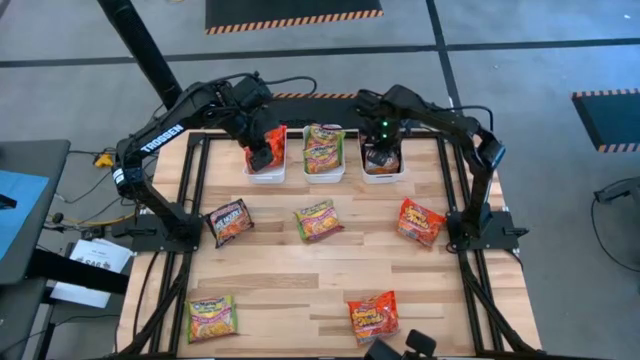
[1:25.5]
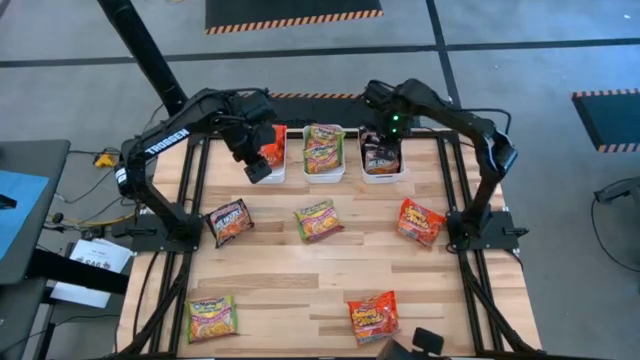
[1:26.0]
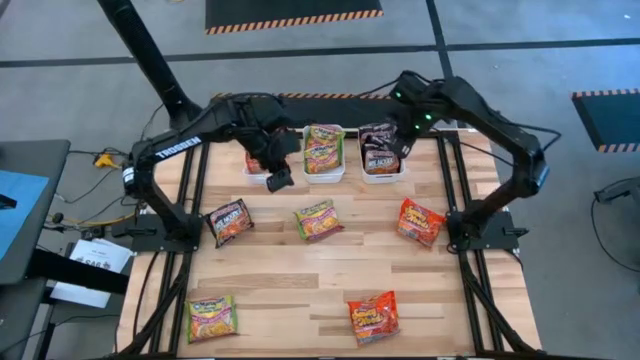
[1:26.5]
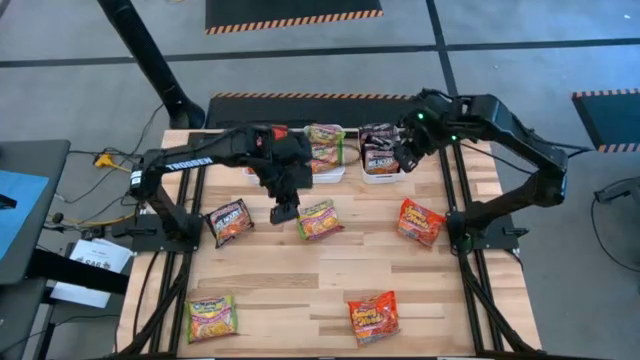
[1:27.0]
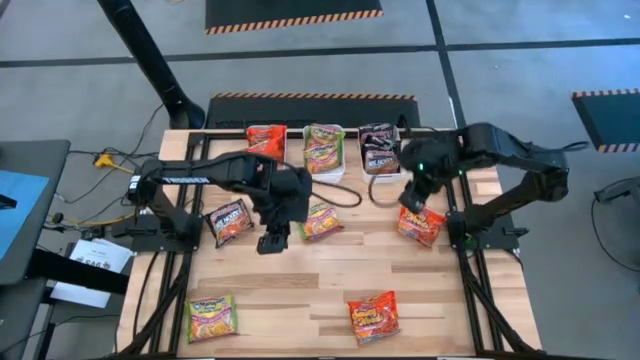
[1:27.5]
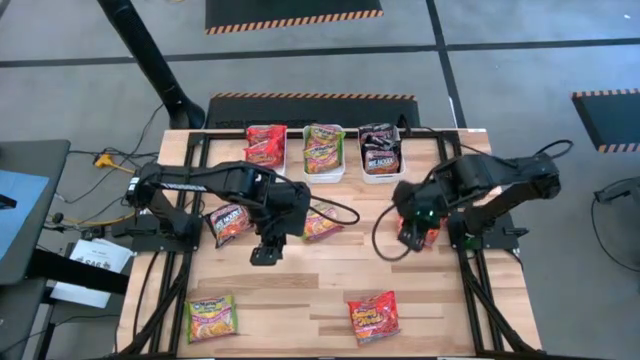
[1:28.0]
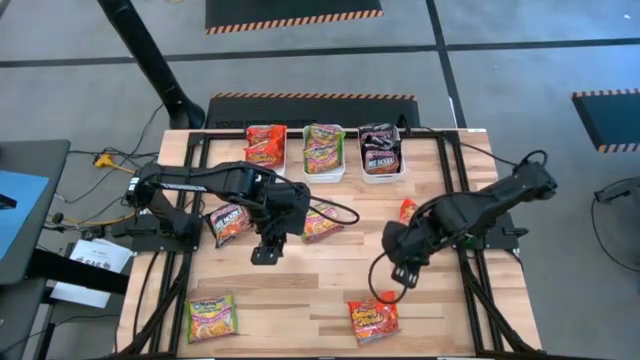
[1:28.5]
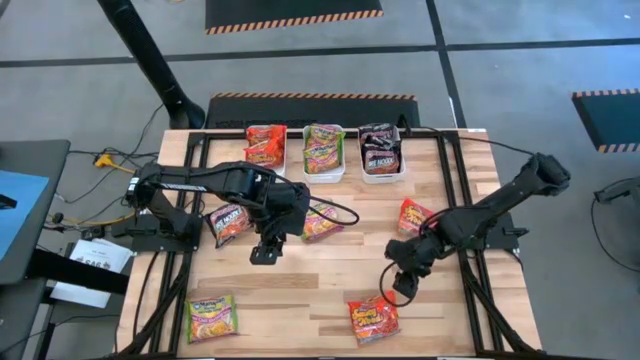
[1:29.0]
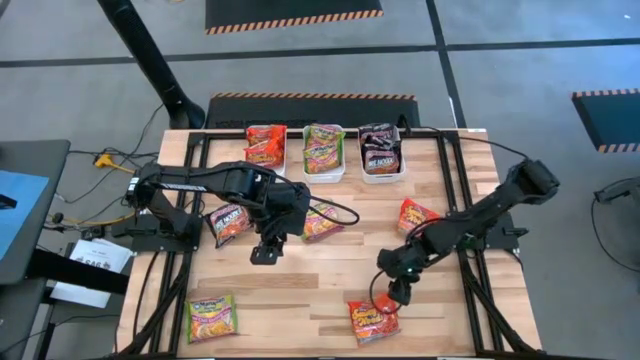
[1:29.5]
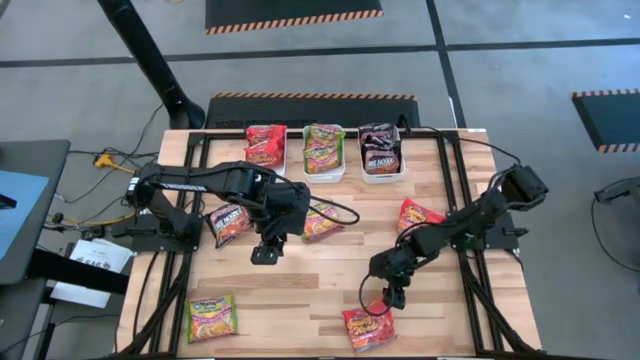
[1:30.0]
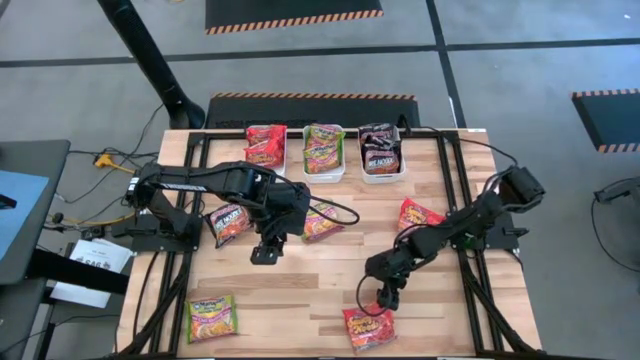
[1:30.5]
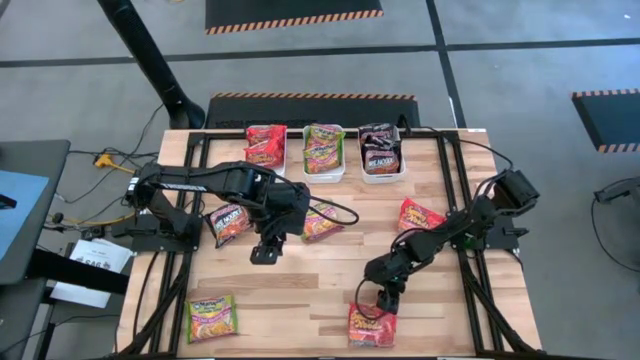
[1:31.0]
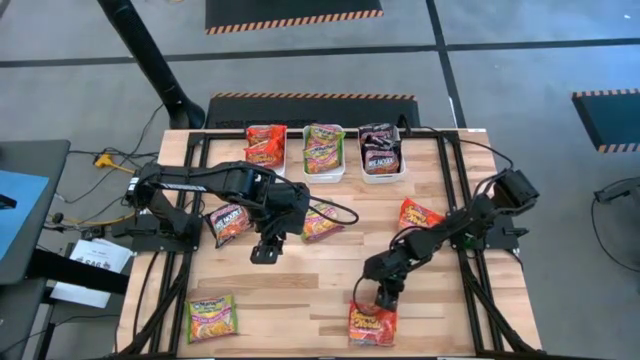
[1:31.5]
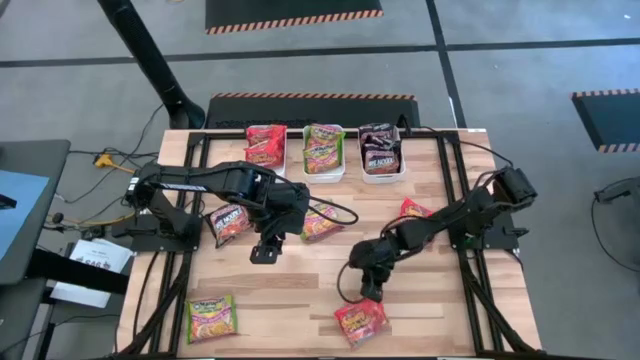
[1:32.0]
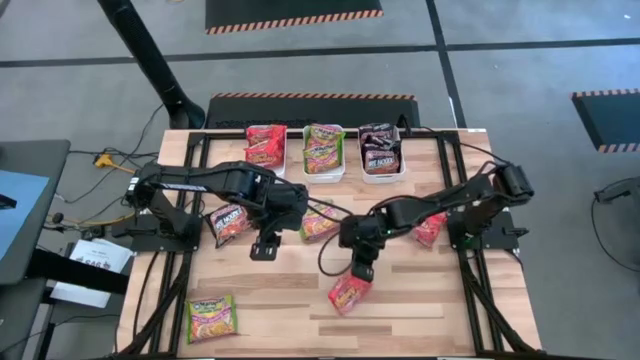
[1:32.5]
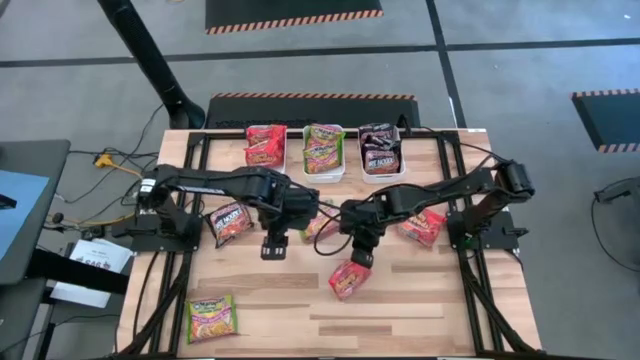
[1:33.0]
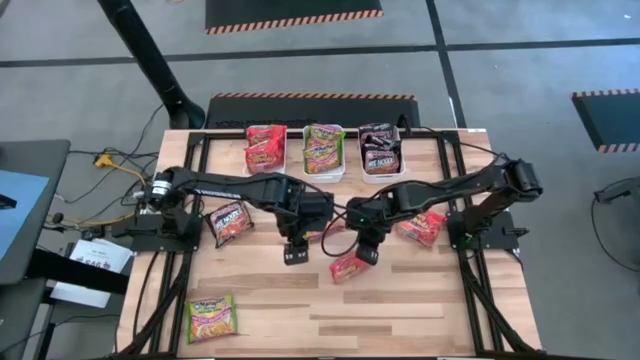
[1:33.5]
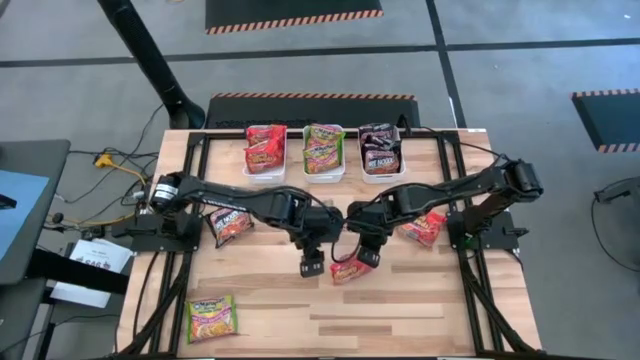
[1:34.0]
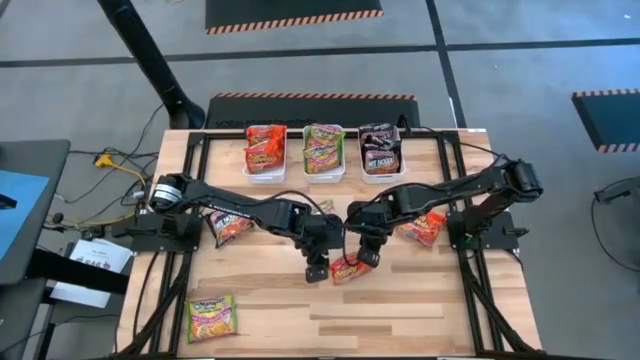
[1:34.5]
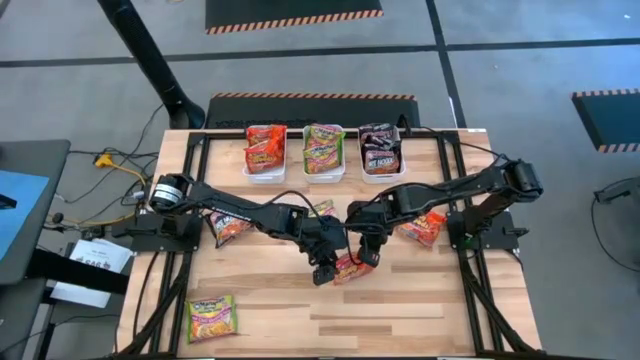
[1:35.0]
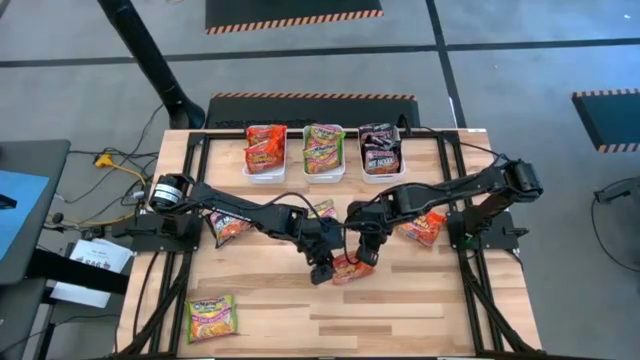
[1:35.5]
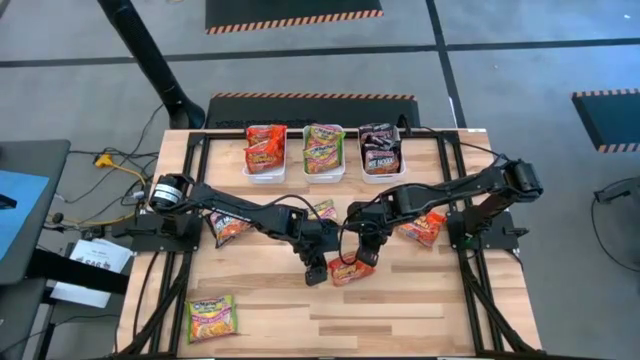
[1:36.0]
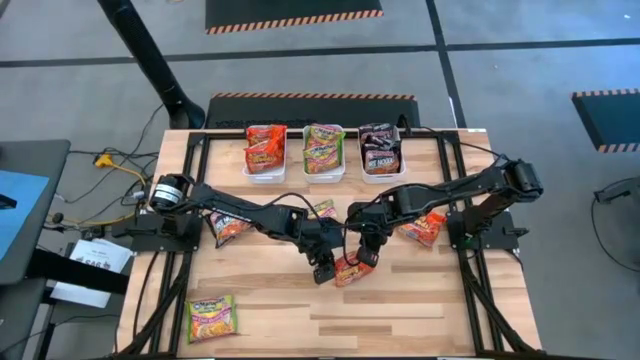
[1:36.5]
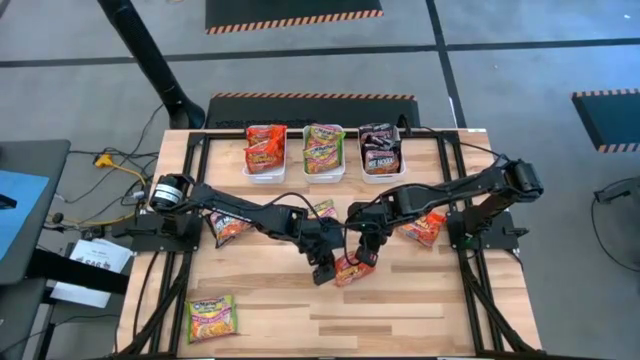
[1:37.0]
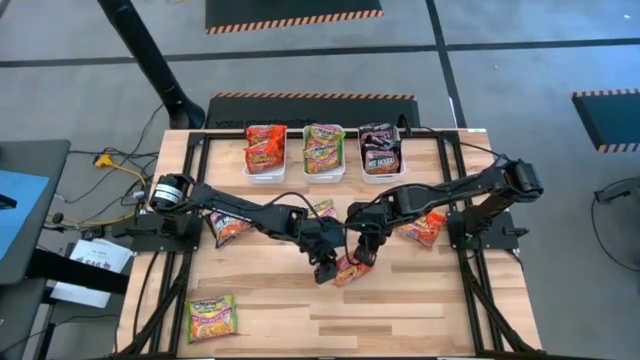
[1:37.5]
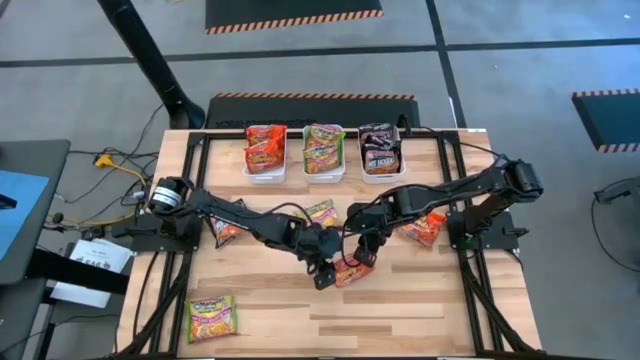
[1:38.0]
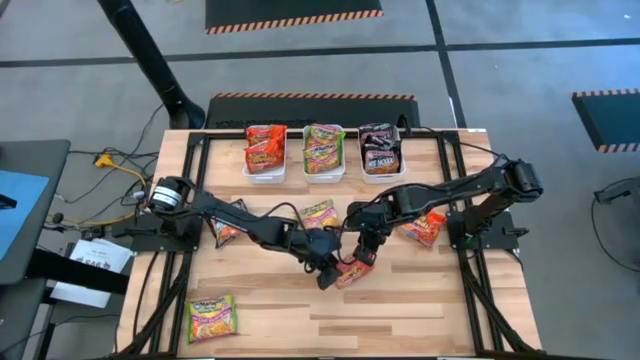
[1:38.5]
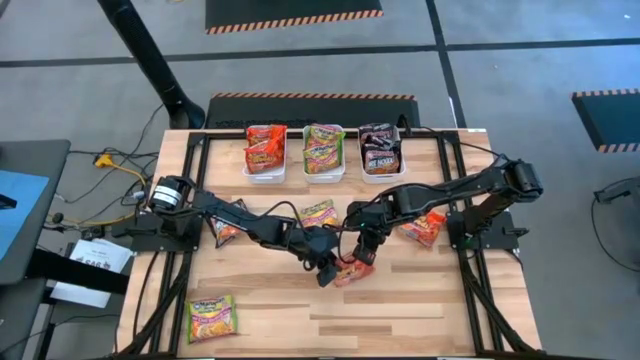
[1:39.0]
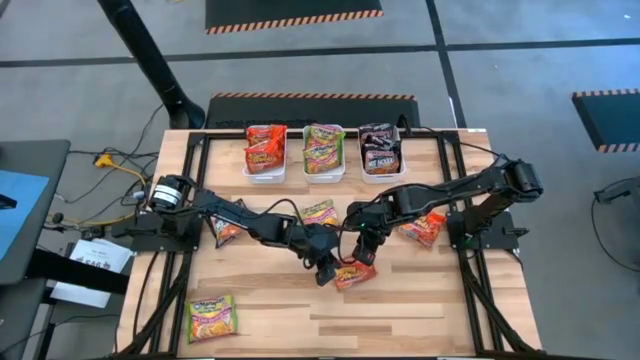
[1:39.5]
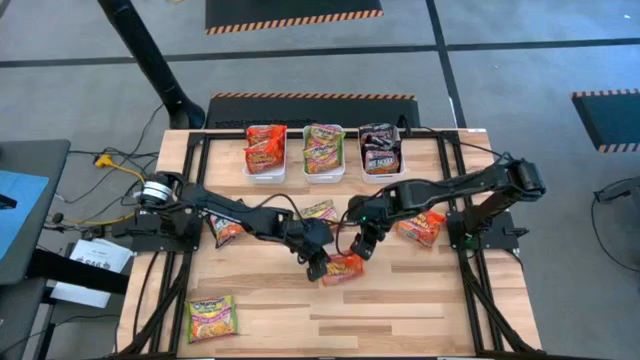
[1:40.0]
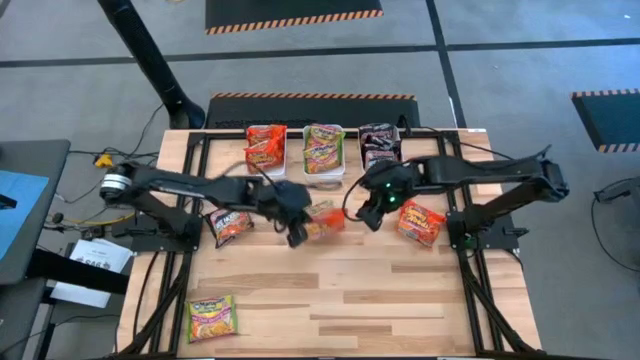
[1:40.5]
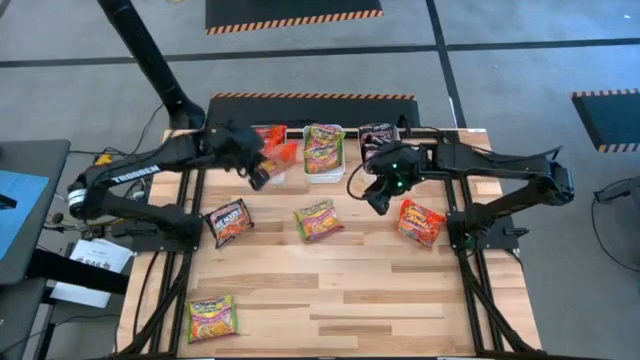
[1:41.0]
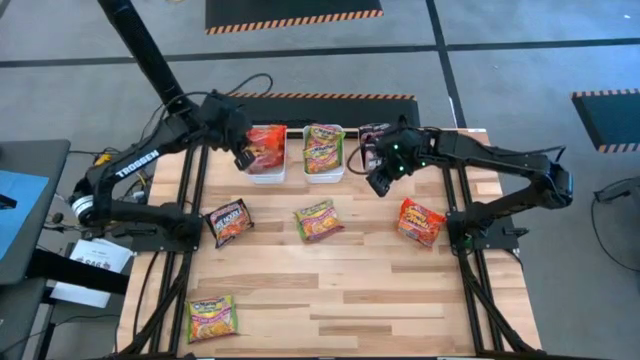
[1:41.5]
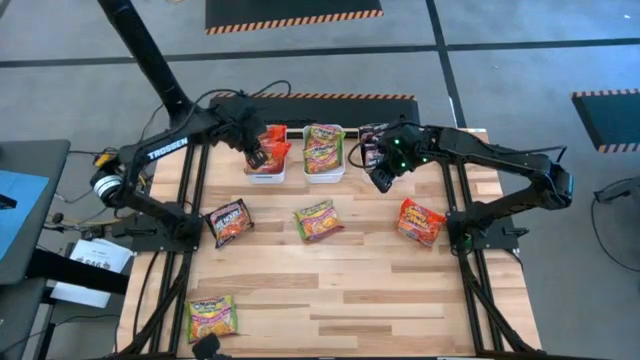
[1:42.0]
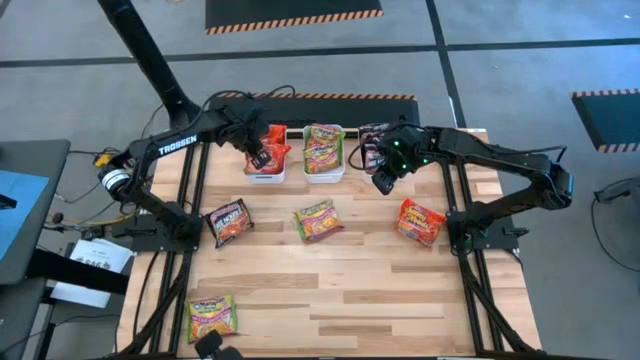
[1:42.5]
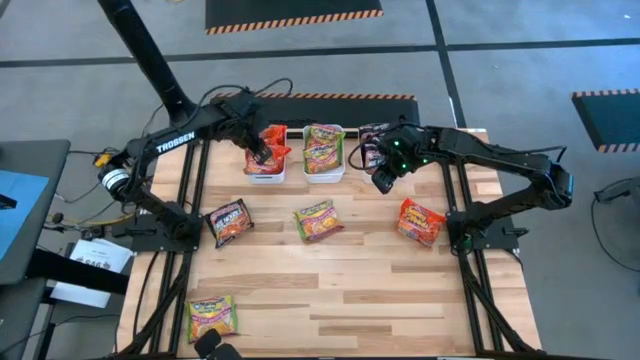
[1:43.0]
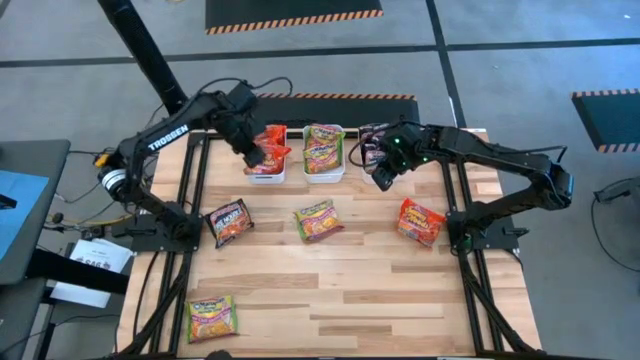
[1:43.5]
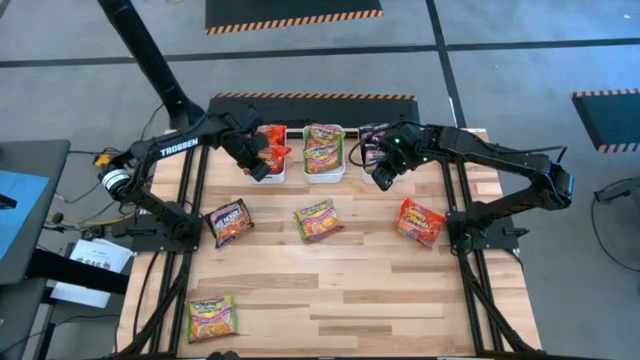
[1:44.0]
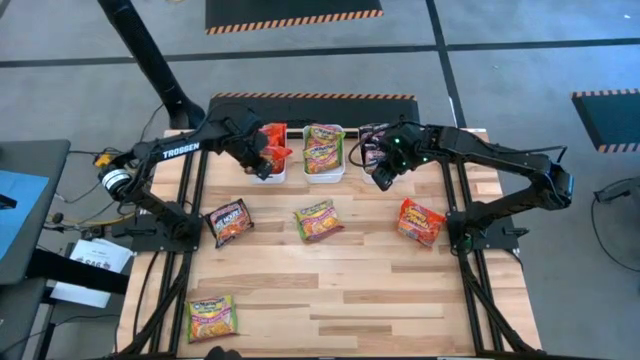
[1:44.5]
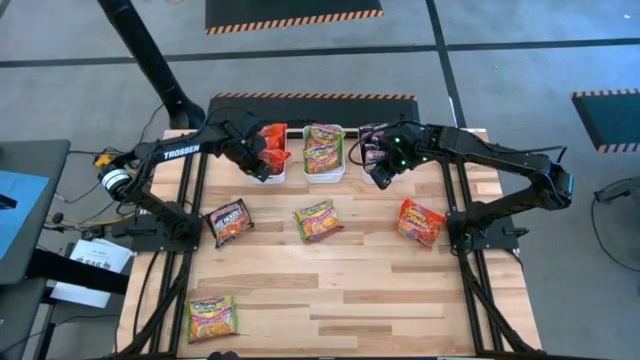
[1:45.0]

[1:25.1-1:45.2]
Task: Sort Maruchan noodles
Put the bottom orange noodle pack into the left white bin
